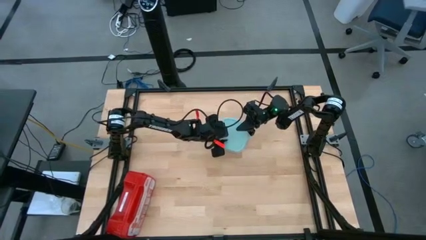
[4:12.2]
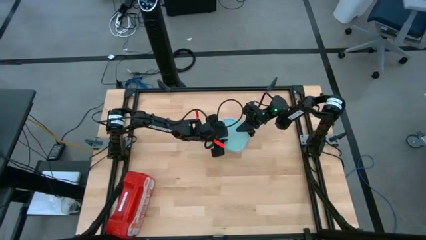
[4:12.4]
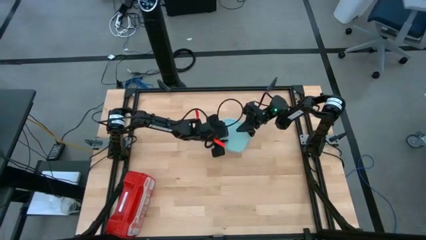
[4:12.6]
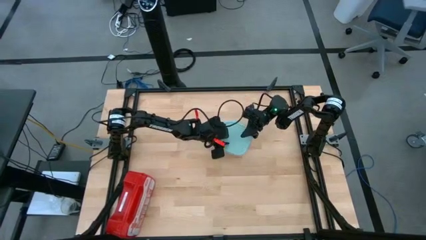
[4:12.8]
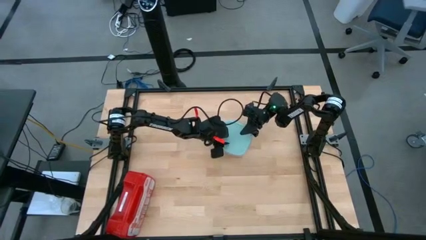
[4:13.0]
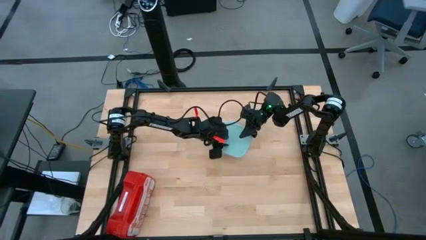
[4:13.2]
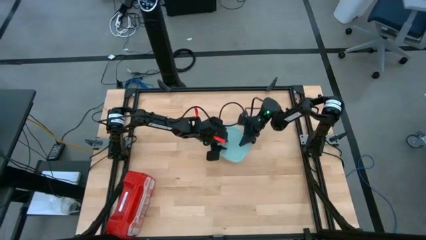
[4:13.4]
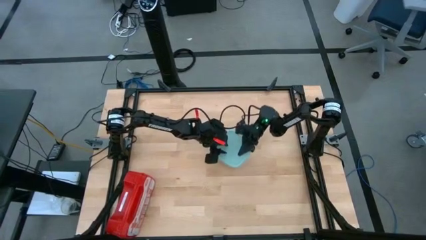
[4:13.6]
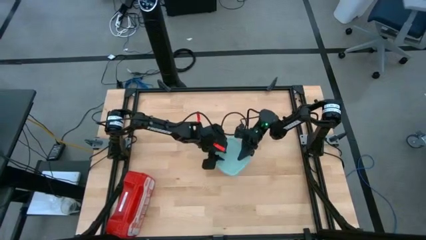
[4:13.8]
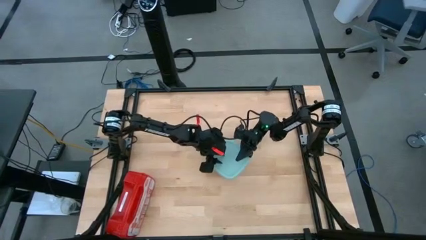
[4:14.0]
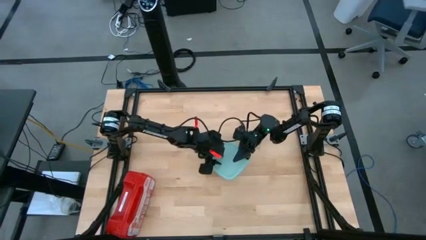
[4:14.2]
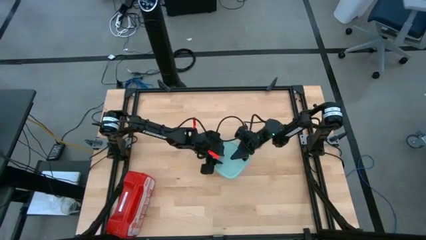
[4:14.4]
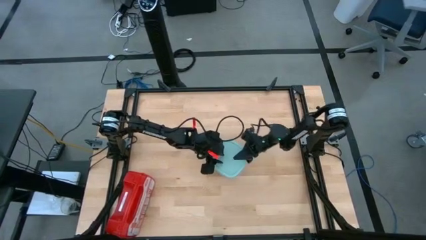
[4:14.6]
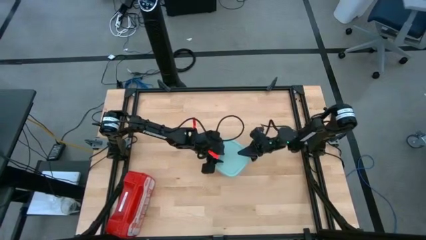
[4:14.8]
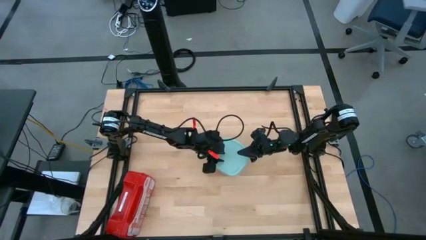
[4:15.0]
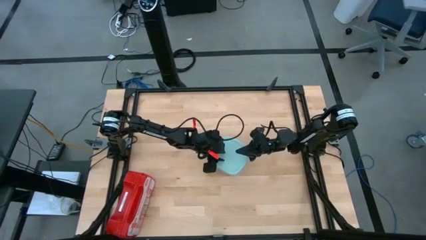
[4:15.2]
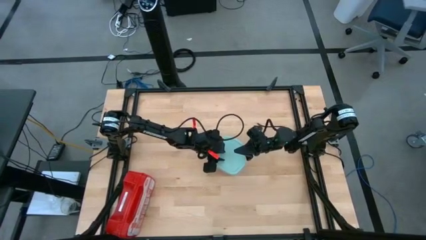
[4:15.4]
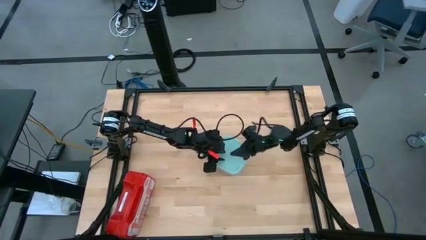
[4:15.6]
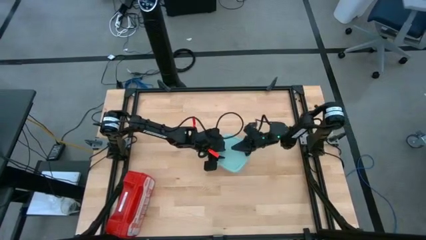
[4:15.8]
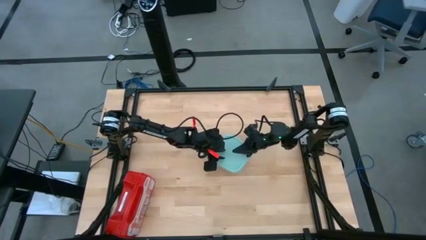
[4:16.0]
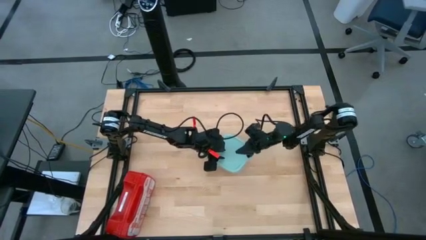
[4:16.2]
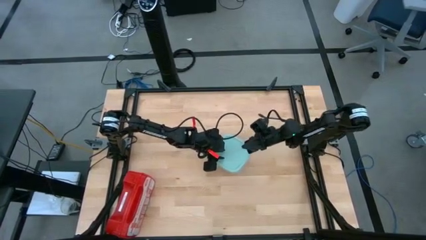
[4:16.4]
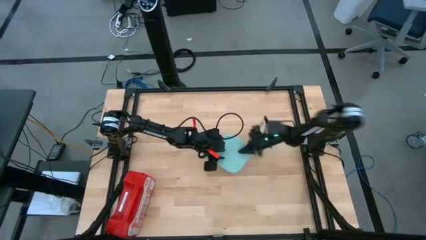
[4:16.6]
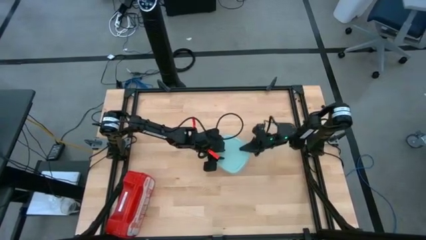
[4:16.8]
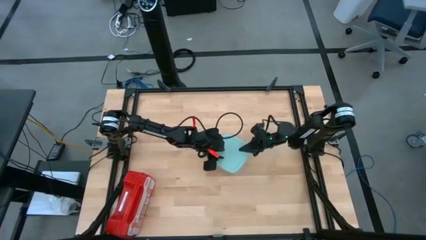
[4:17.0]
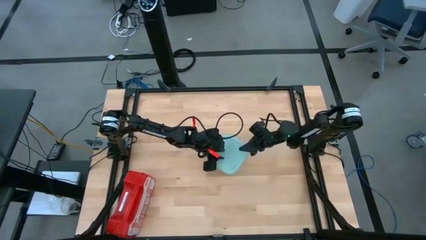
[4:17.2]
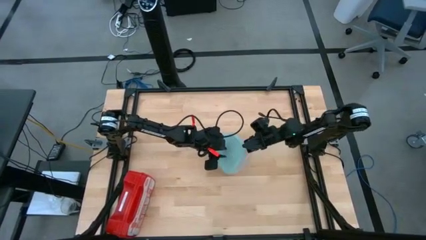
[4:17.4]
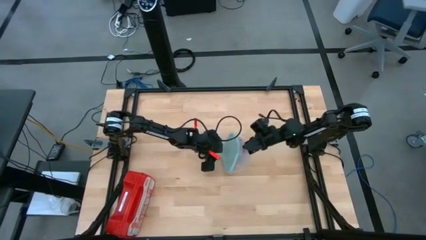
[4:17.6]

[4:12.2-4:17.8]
Task: Roll bandage
Close the green tupperware

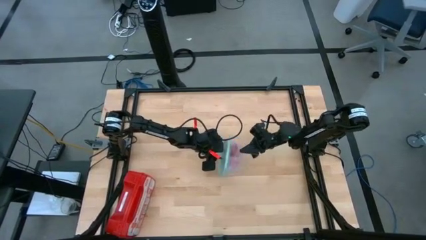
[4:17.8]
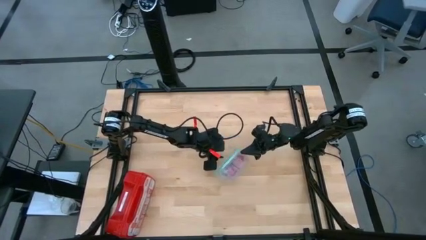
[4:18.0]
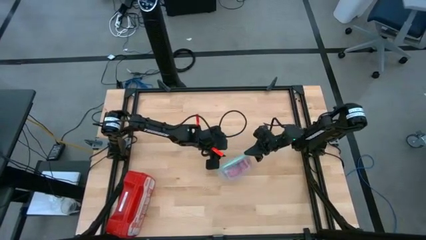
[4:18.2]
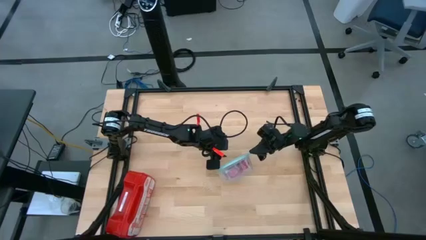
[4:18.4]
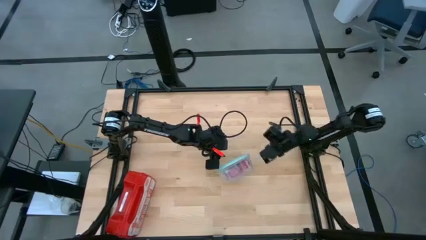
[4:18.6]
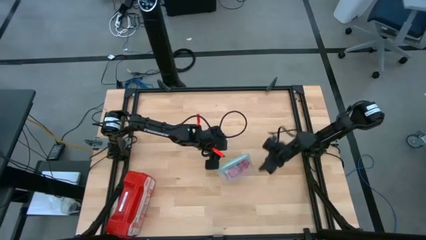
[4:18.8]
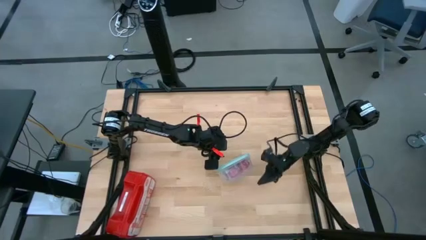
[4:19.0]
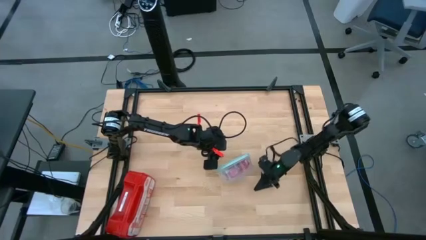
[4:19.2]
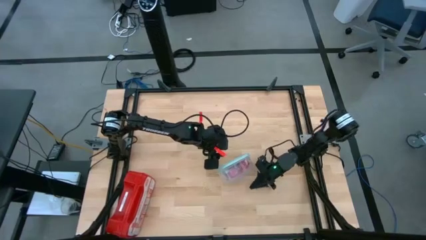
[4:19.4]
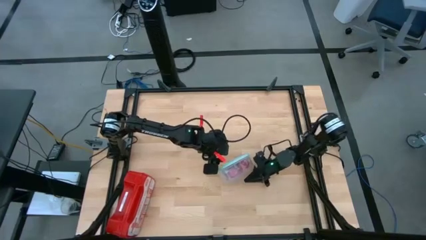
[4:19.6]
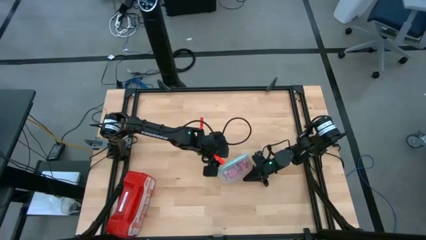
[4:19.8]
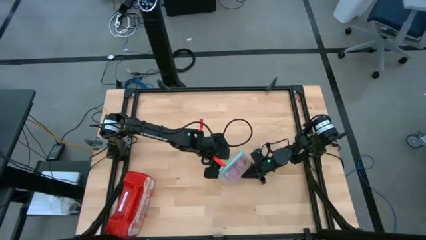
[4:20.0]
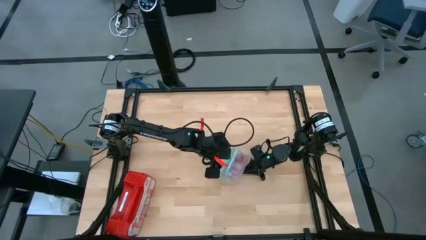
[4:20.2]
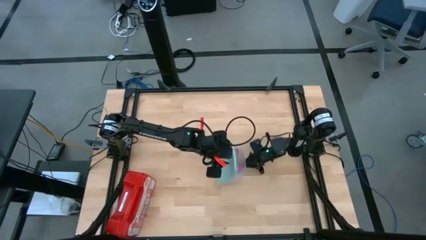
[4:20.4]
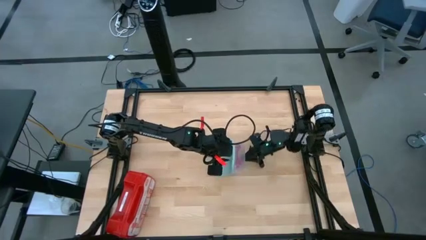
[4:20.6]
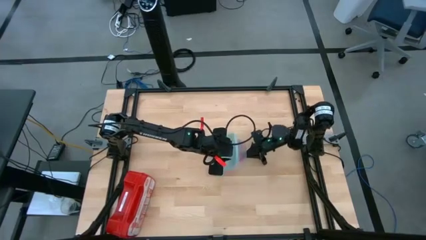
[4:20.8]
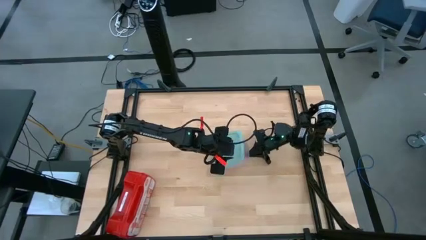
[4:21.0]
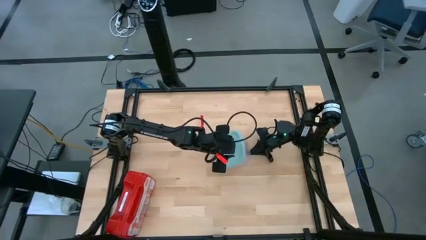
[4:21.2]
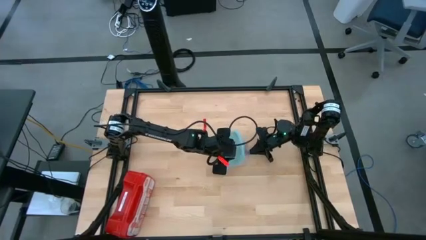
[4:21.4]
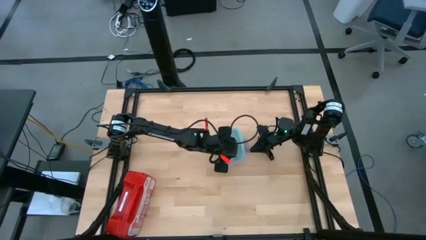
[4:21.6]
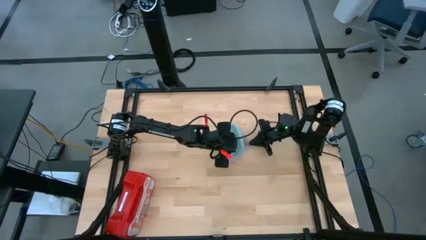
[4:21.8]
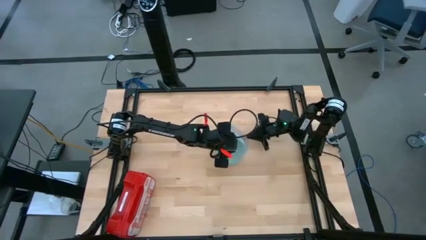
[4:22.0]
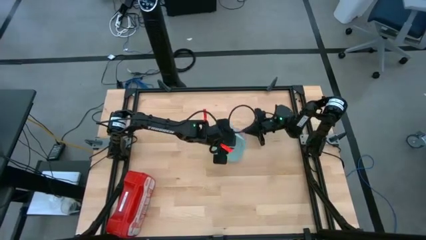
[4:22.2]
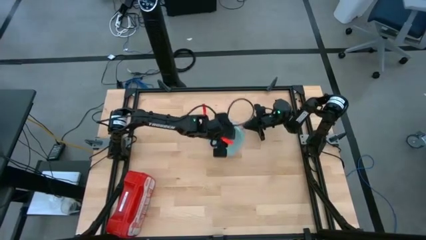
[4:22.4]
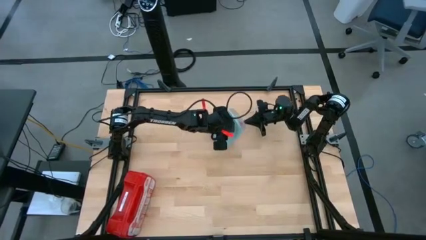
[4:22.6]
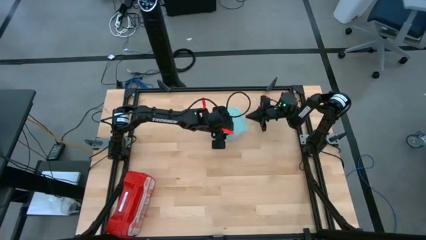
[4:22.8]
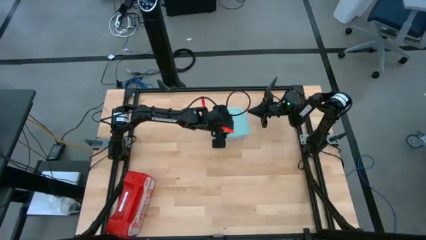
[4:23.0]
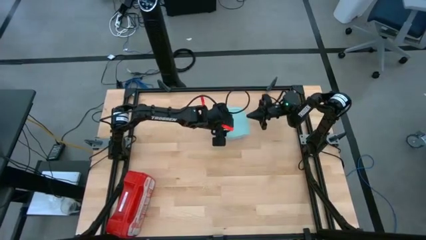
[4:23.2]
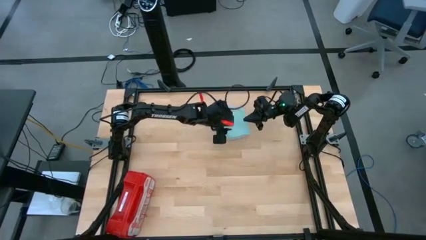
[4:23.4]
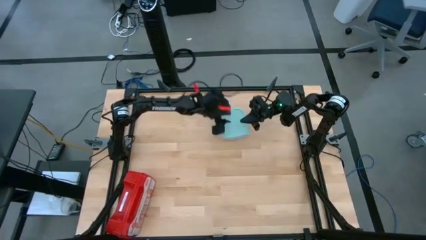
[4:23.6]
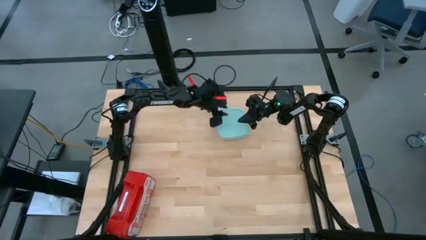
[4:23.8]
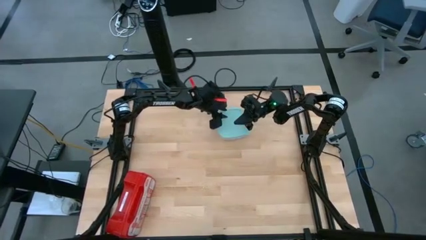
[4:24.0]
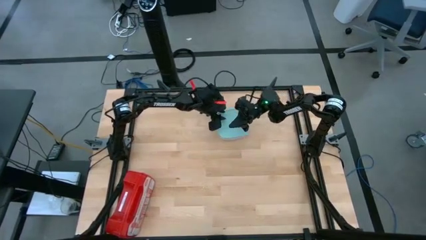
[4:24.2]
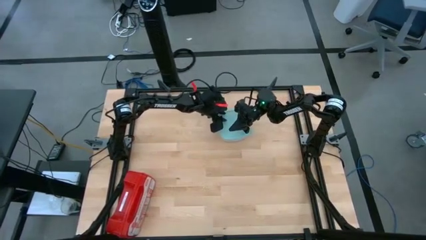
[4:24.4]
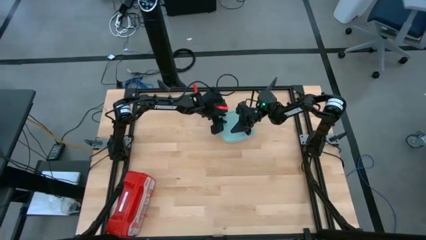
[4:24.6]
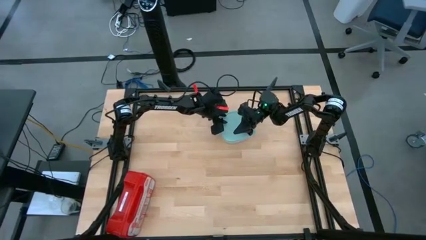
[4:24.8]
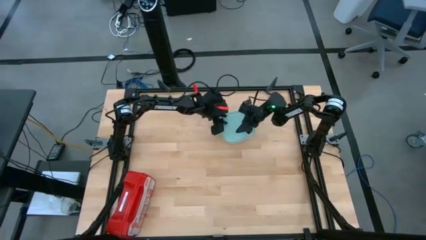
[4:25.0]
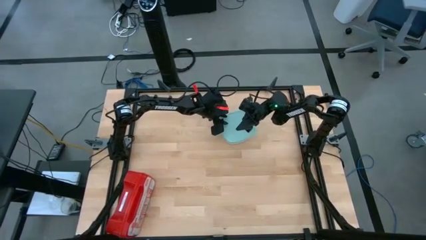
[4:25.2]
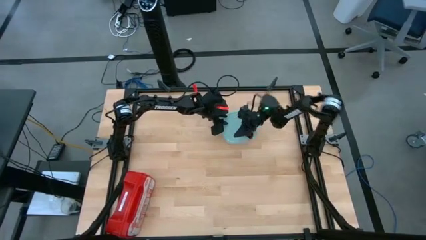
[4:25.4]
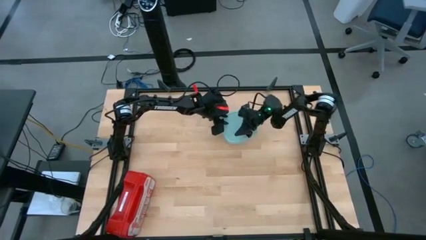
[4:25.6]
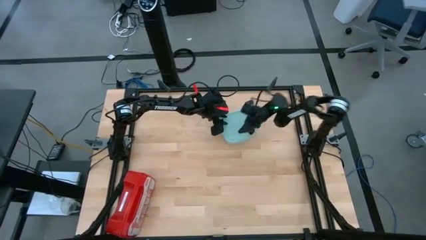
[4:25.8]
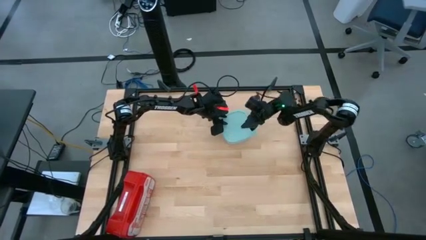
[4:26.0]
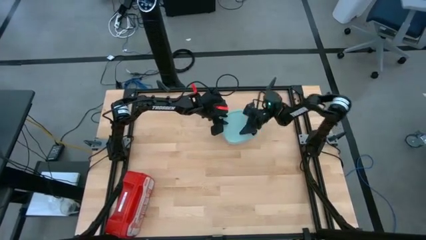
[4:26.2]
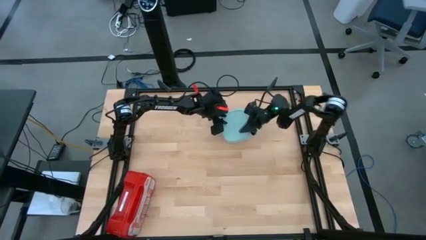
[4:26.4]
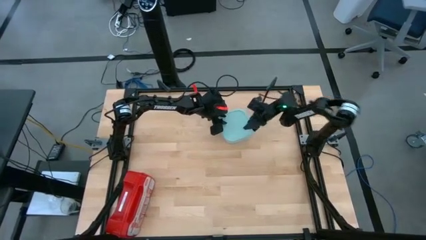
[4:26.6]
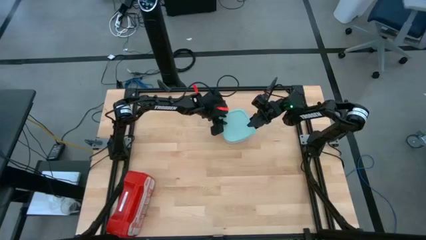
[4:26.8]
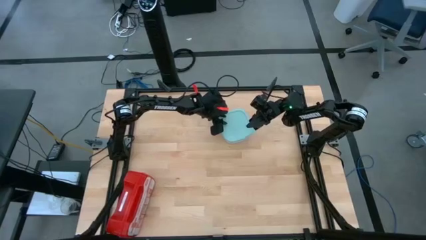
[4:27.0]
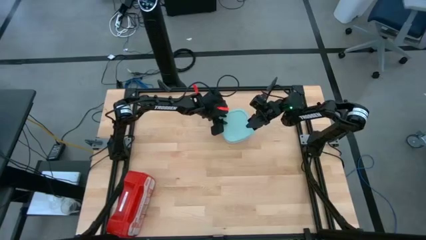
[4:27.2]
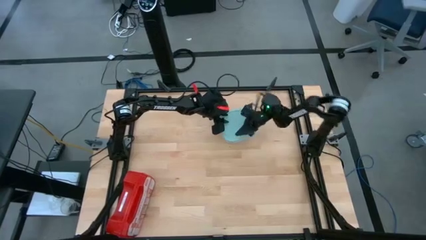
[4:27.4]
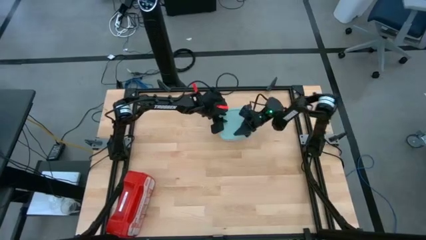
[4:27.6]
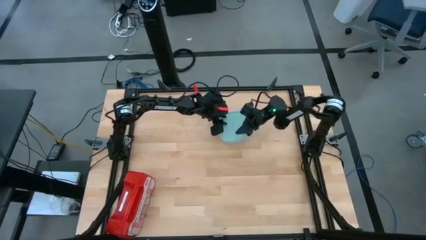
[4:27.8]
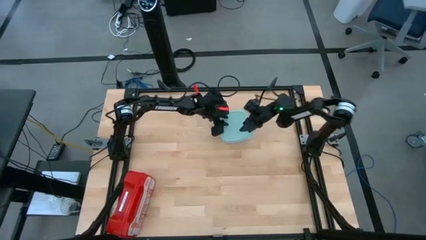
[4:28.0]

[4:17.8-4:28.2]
Close the green tupperware
